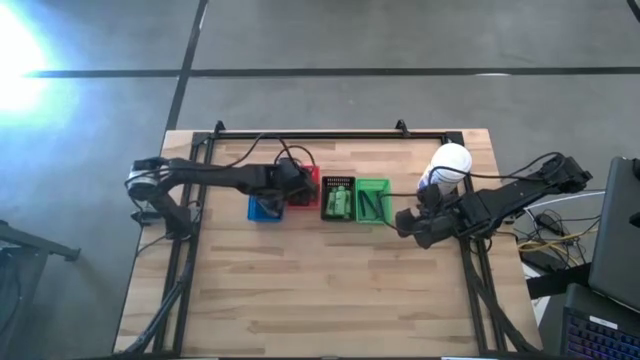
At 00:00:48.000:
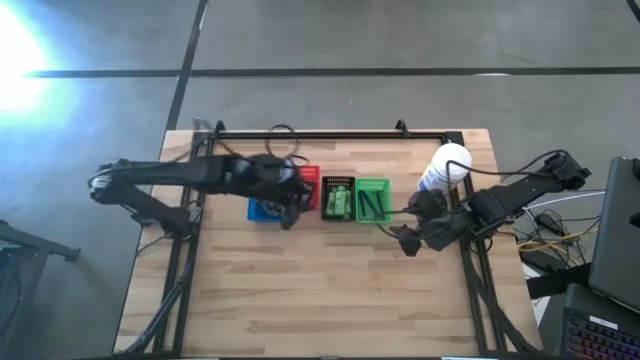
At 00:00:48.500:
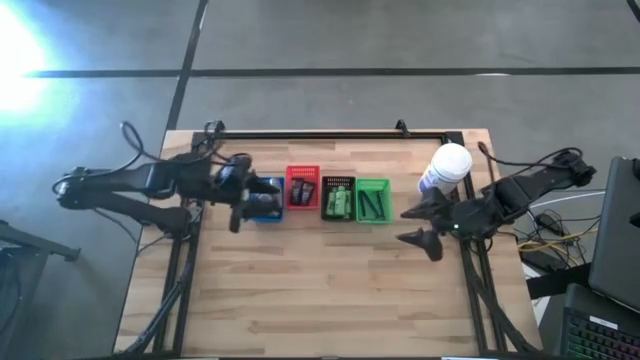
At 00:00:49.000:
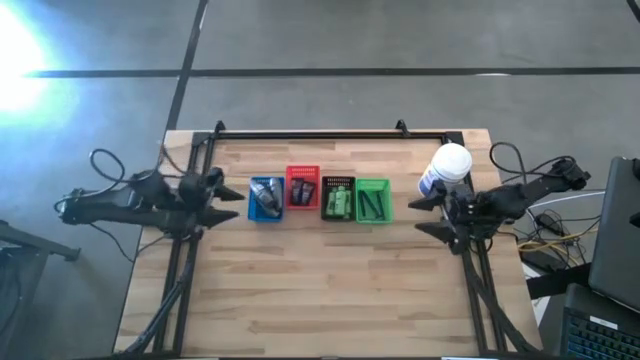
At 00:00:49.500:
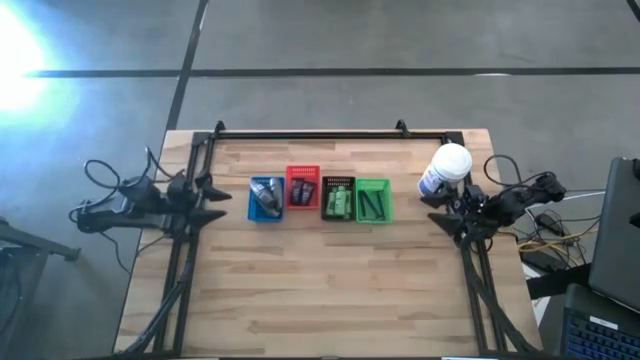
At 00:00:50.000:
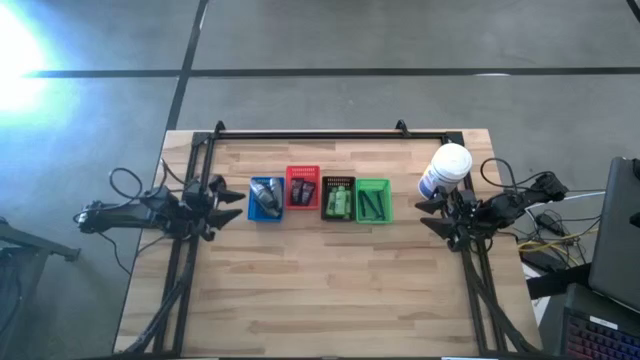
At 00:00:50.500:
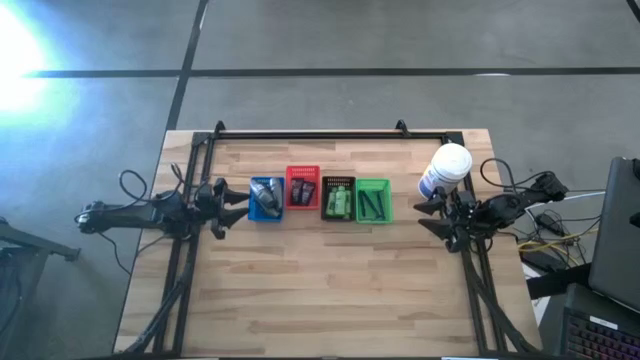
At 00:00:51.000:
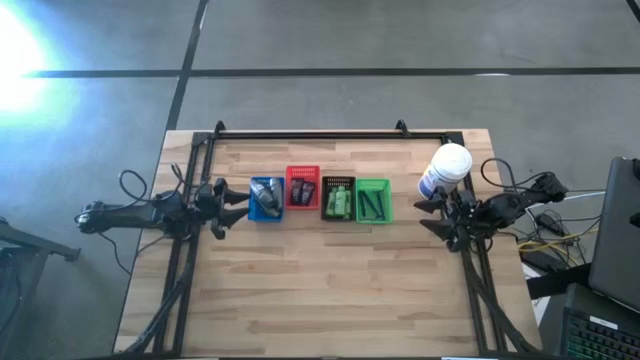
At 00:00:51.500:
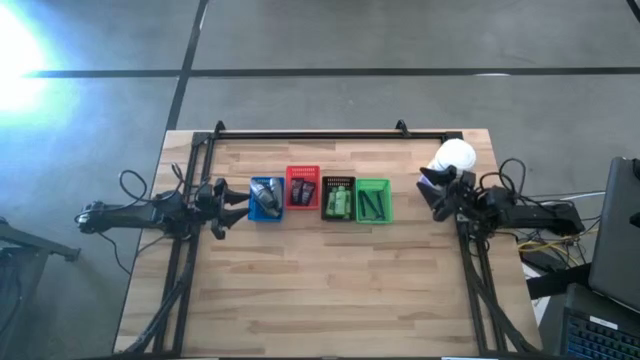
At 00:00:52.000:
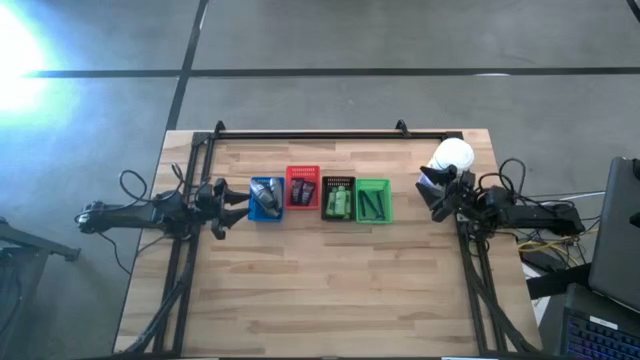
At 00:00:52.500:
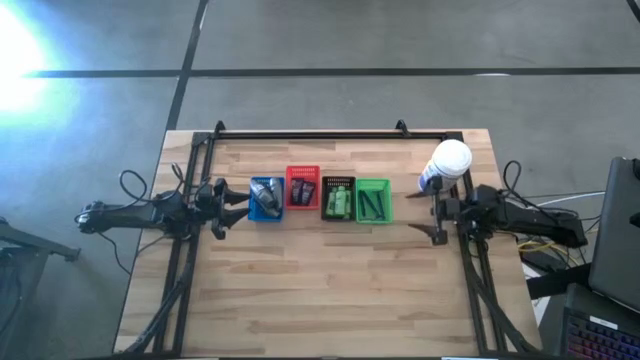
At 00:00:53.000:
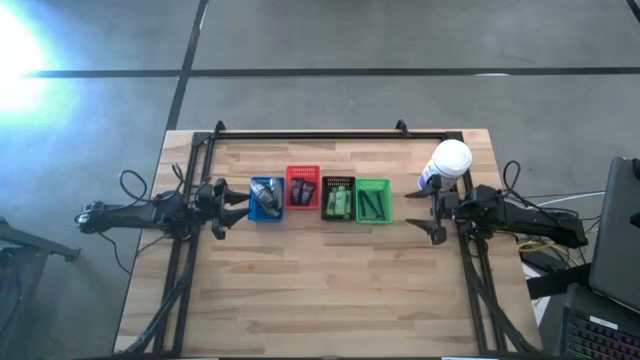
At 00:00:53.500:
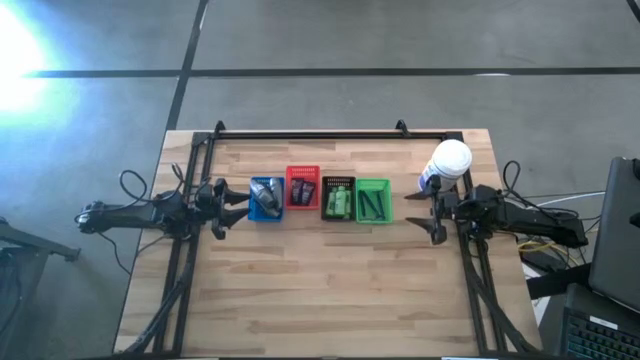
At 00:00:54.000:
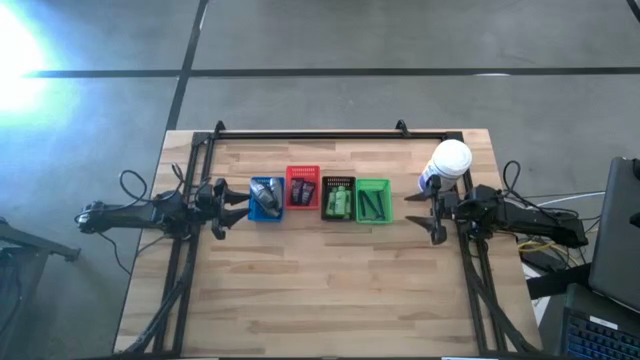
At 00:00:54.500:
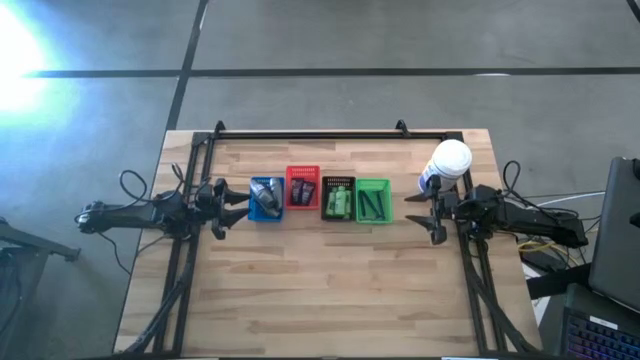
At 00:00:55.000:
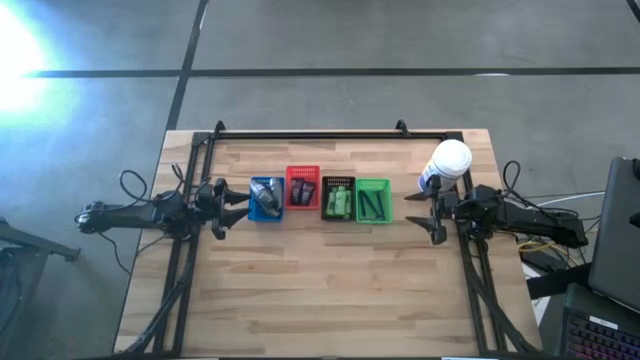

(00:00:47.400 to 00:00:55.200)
Task: Pick & Place Travel size toiletries
Return to Home Position

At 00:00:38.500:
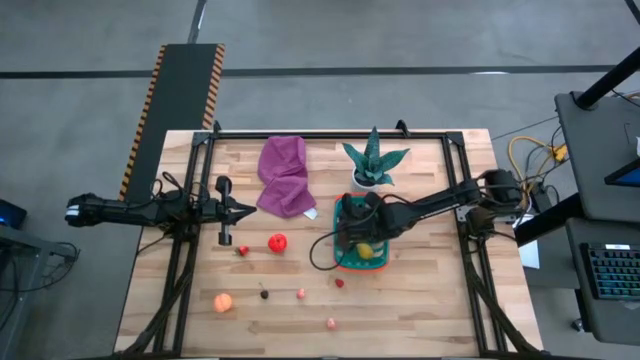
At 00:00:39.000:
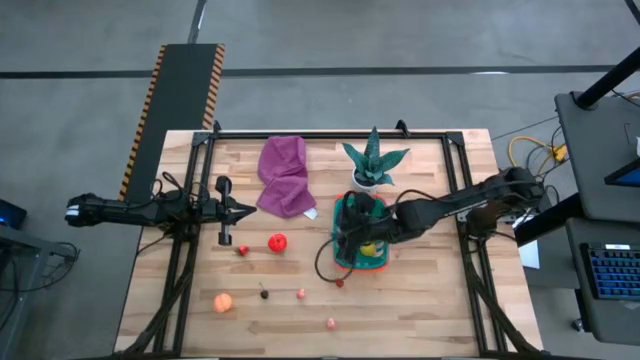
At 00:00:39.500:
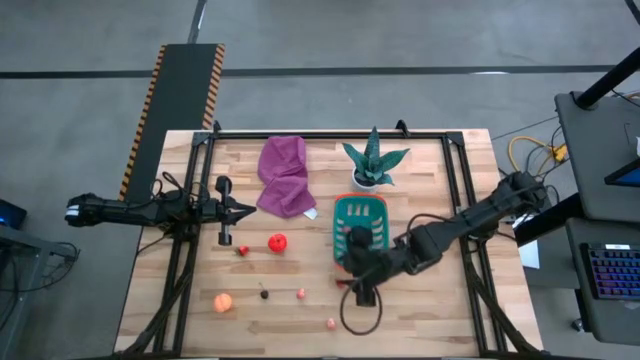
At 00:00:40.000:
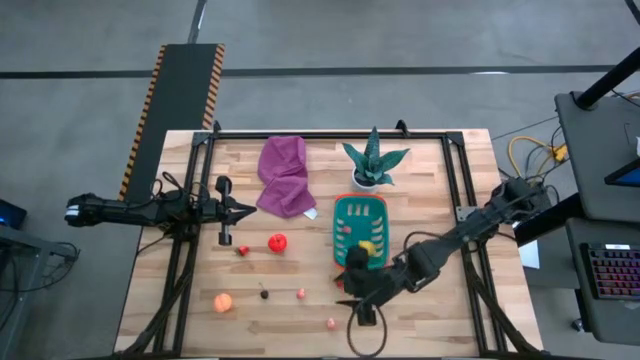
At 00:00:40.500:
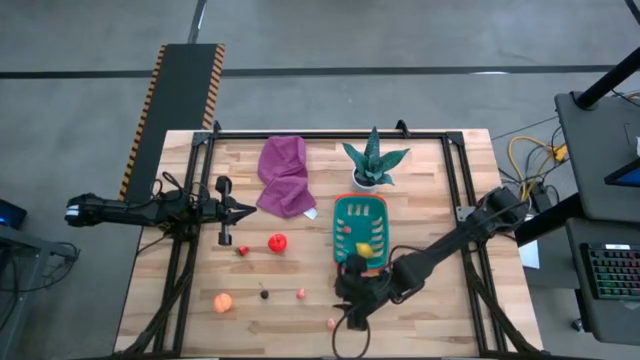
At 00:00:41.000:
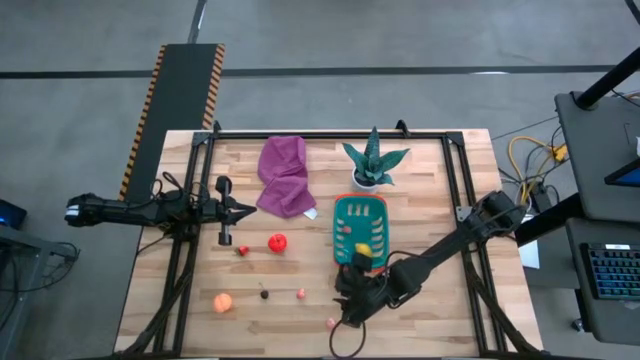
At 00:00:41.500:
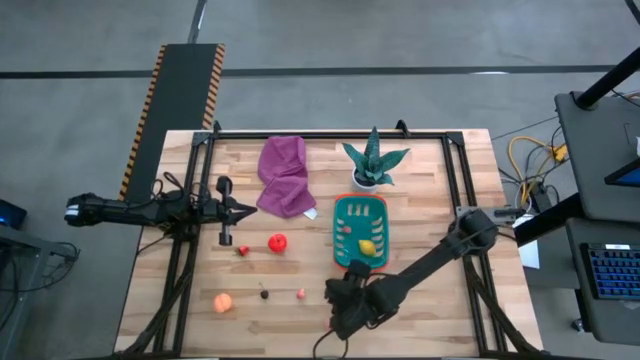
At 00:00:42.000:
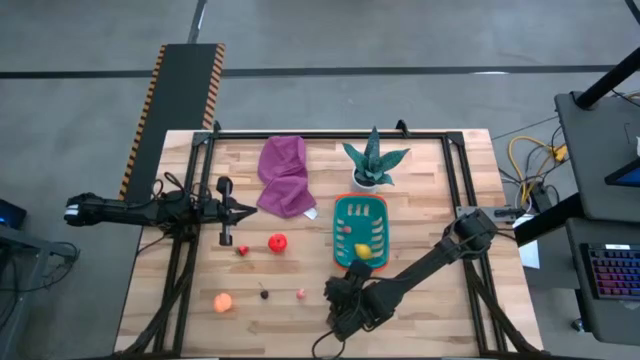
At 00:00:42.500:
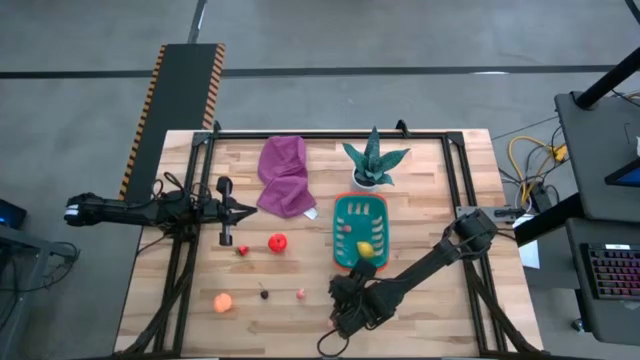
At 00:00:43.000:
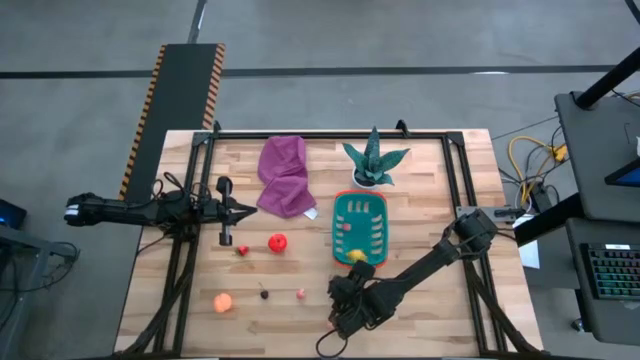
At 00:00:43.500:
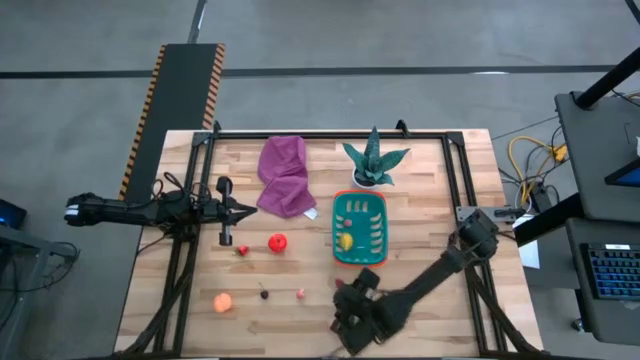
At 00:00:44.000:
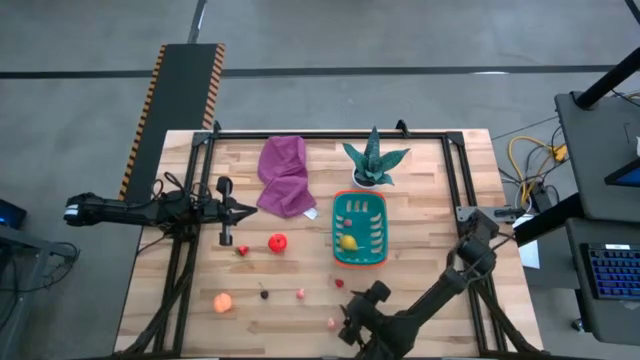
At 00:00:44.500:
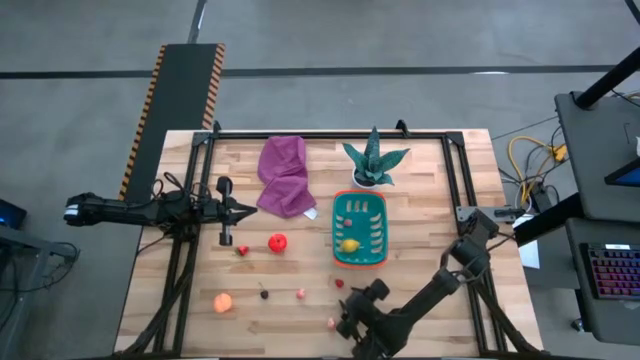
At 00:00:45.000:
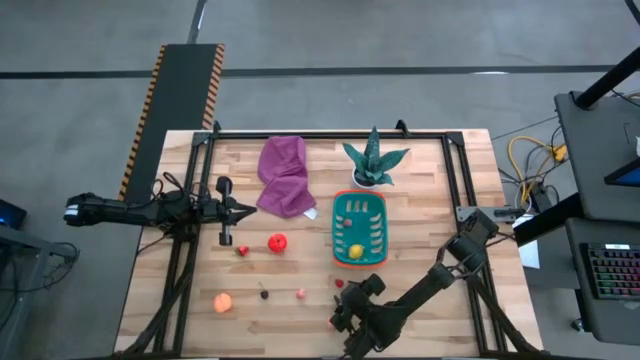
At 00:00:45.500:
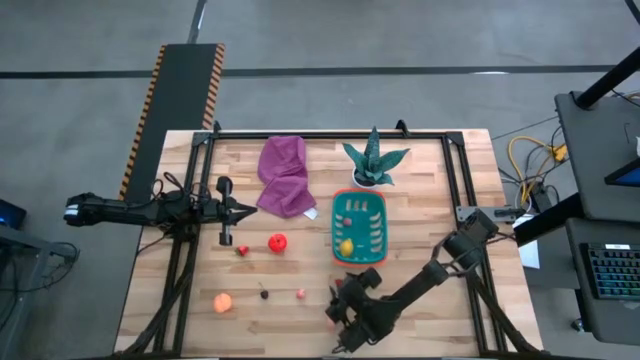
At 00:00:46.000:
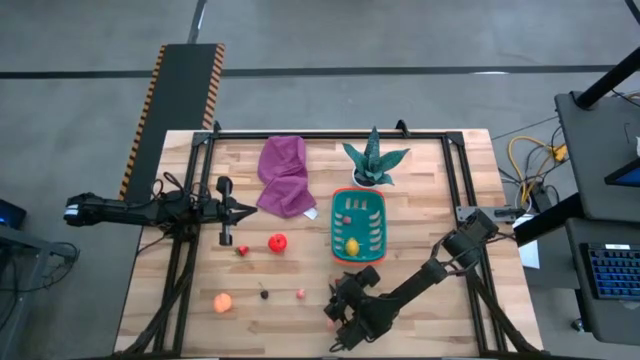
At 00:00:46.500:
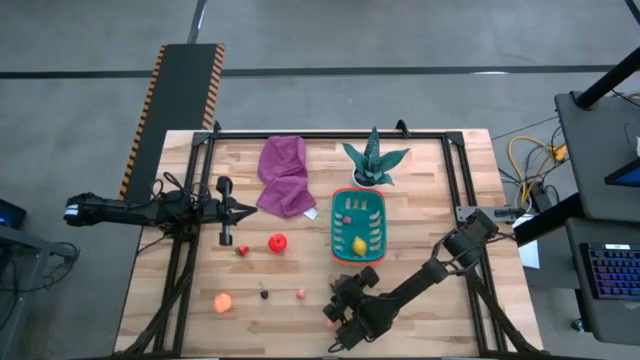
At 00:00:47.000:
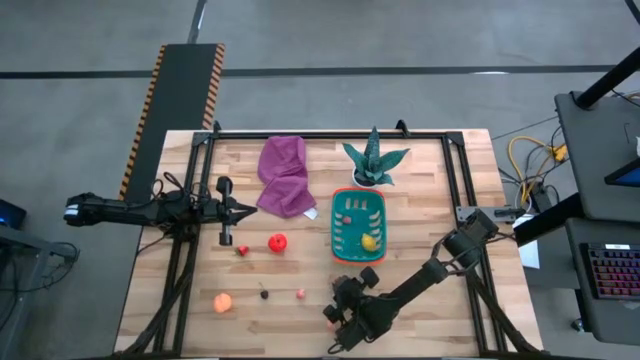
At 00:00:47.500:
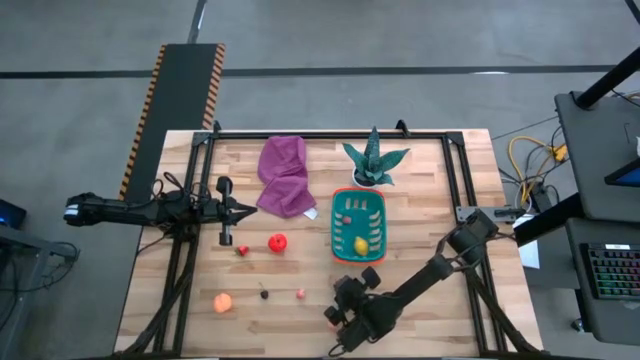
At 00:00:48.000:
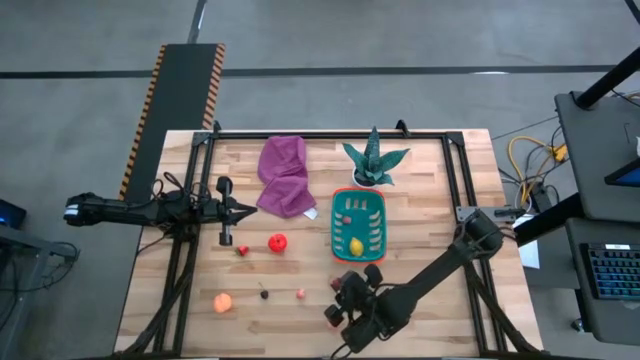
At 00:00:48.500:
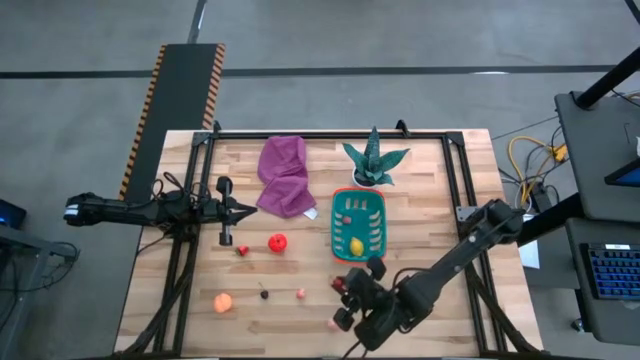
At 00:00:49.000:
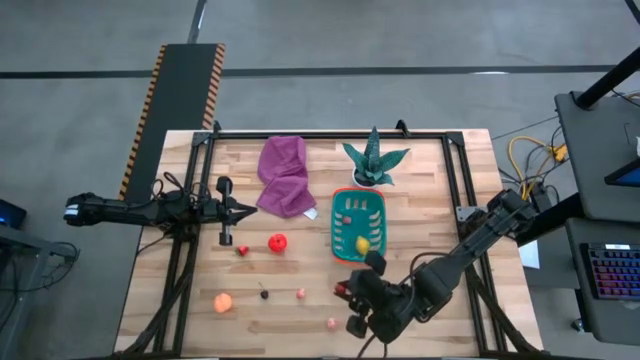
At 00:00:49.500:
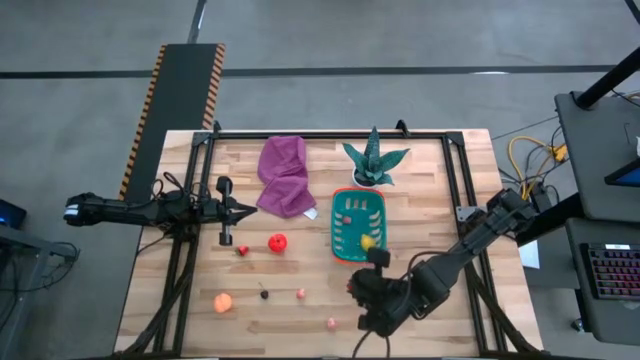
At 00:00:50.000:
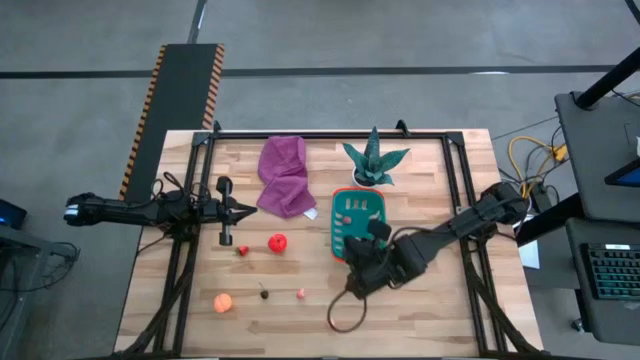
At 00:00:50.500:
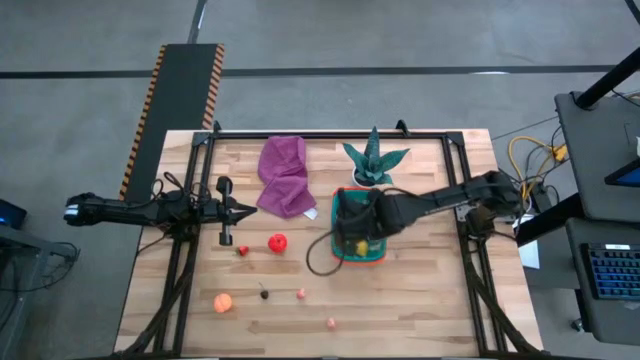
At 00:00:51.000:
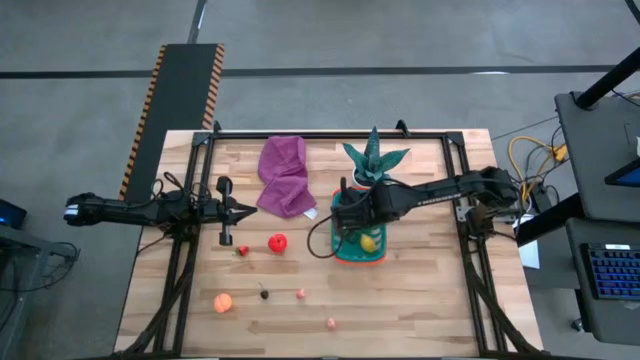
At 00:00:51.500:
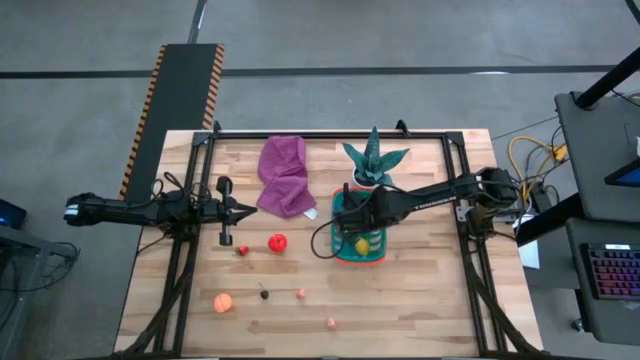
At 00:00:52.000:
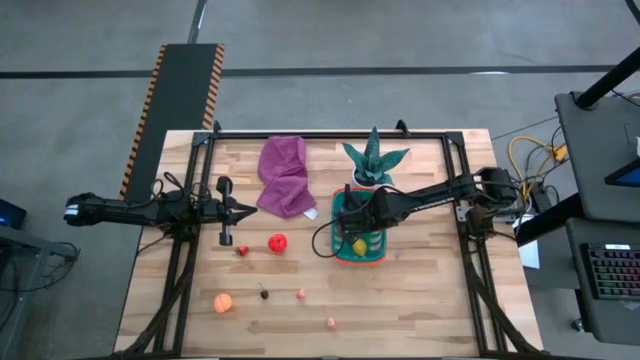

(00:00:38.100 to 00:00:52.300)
Task: Pick and placing Produce into tupperware
Put the red raspberry into the blue basket
